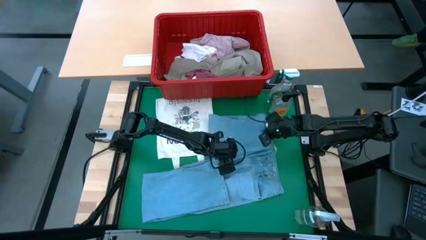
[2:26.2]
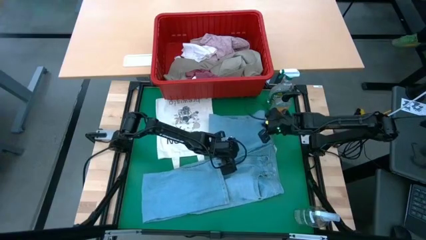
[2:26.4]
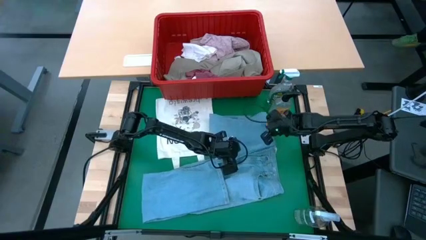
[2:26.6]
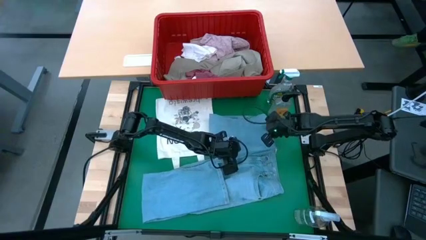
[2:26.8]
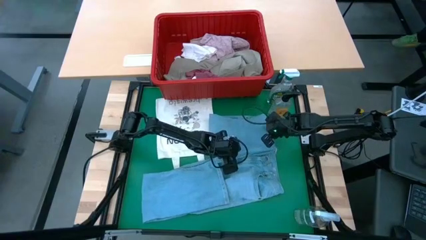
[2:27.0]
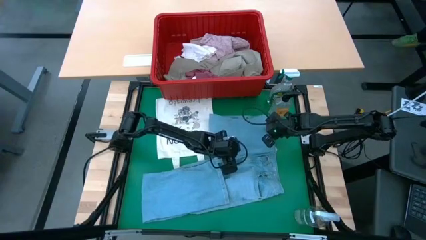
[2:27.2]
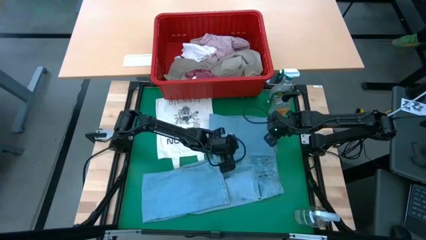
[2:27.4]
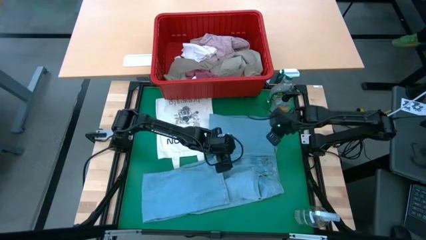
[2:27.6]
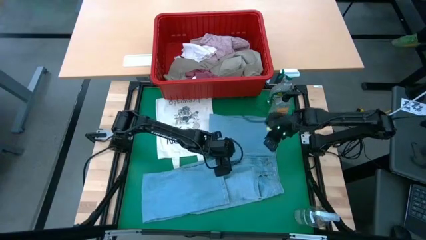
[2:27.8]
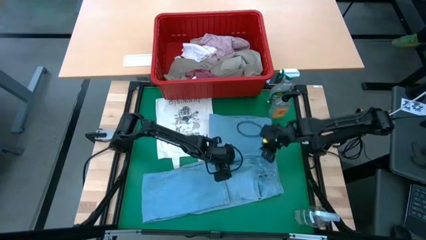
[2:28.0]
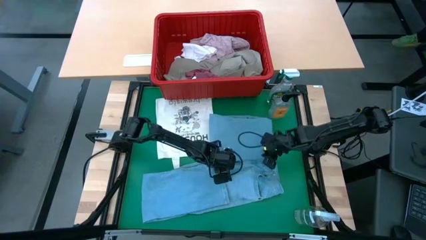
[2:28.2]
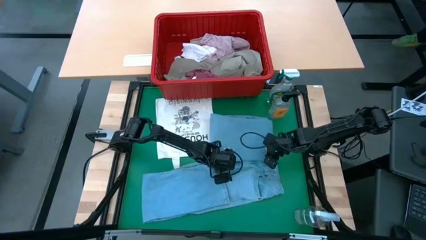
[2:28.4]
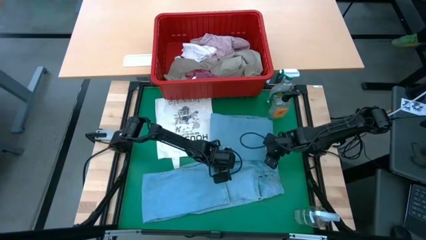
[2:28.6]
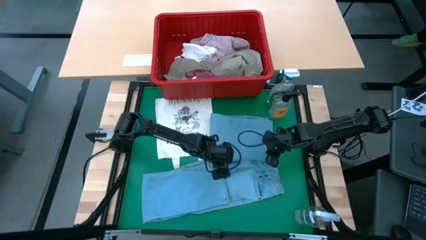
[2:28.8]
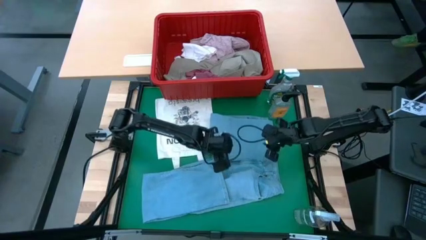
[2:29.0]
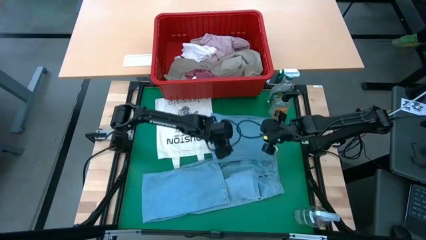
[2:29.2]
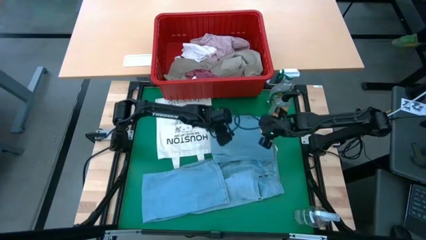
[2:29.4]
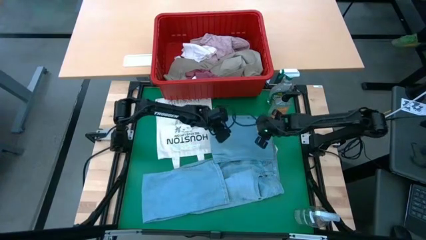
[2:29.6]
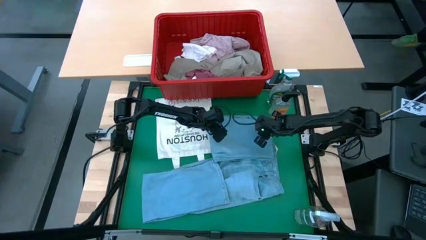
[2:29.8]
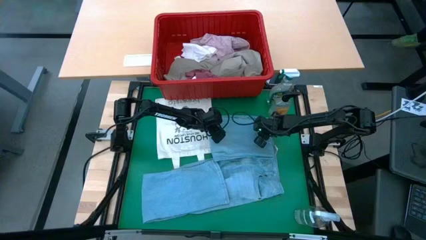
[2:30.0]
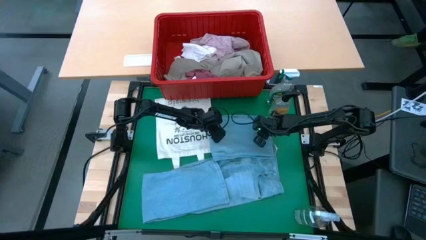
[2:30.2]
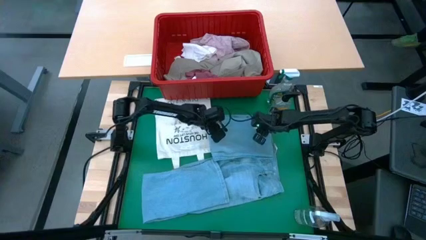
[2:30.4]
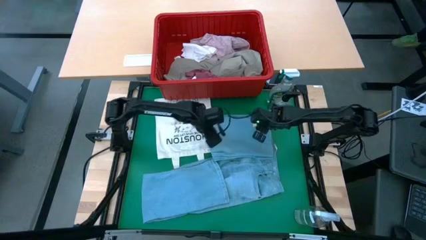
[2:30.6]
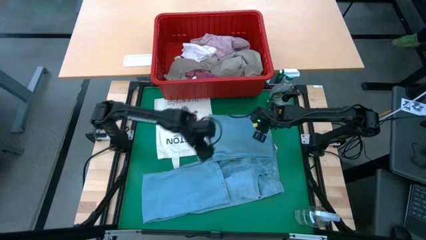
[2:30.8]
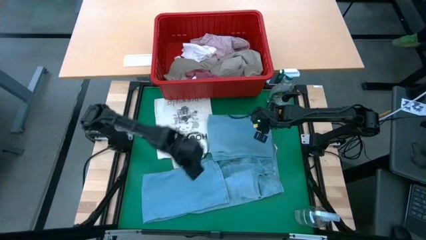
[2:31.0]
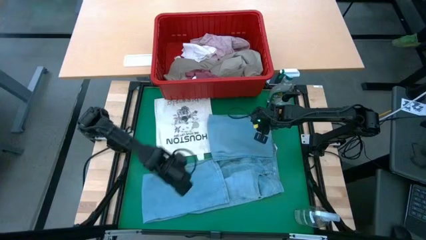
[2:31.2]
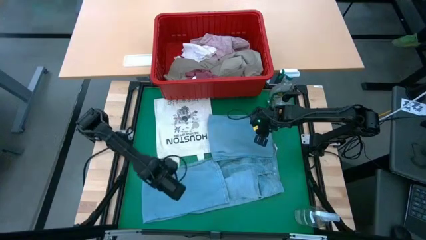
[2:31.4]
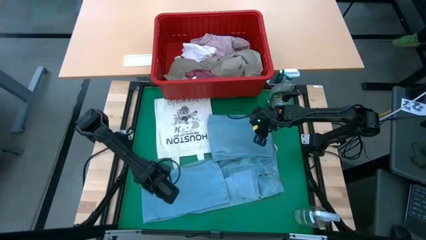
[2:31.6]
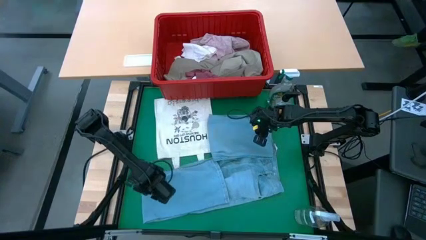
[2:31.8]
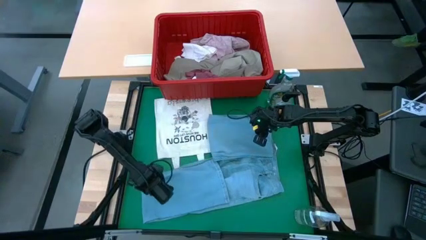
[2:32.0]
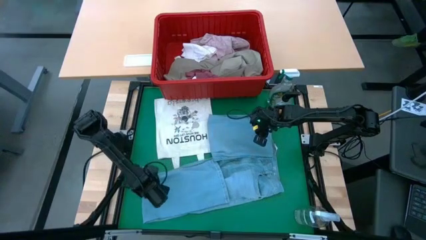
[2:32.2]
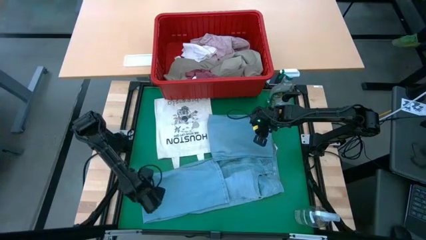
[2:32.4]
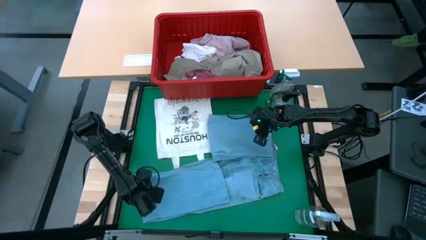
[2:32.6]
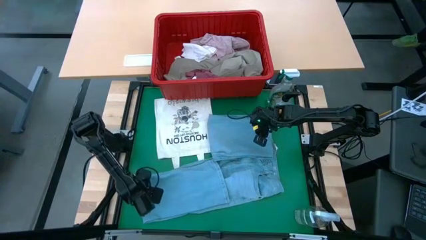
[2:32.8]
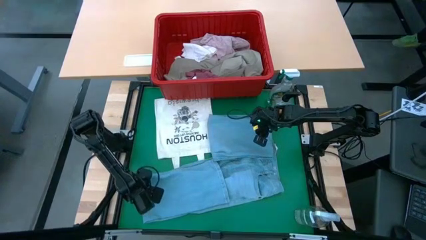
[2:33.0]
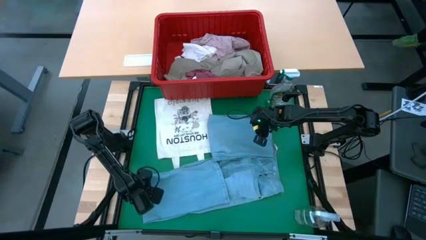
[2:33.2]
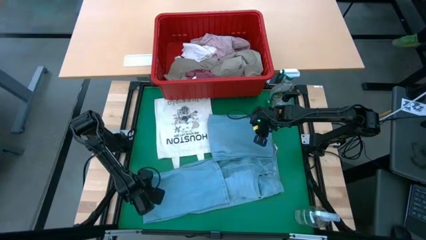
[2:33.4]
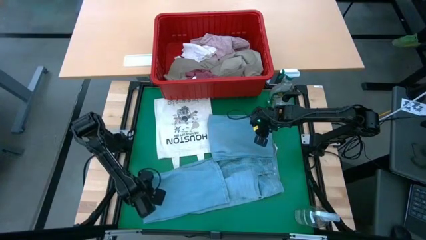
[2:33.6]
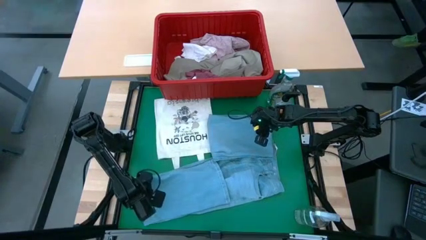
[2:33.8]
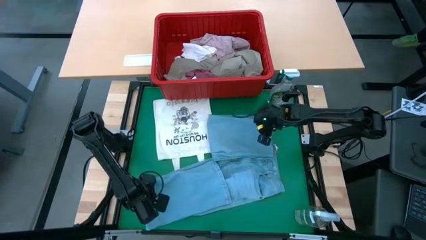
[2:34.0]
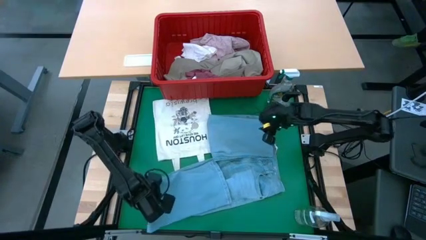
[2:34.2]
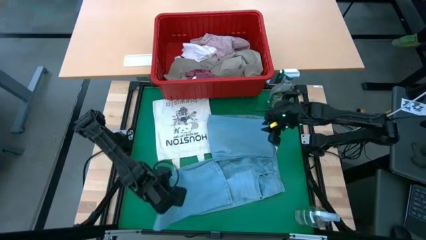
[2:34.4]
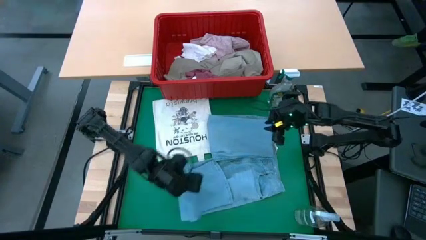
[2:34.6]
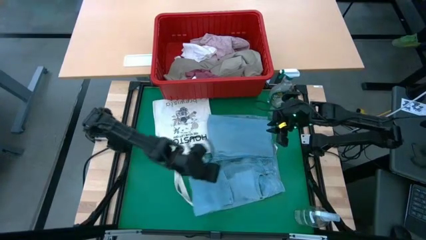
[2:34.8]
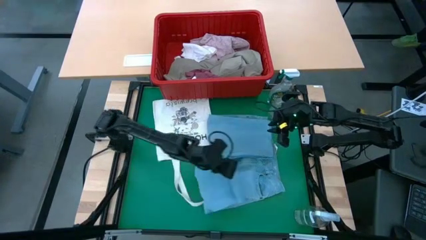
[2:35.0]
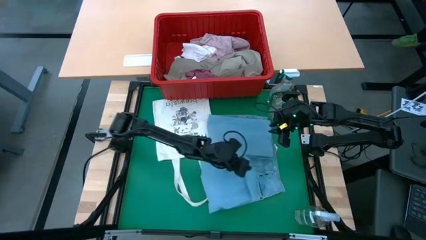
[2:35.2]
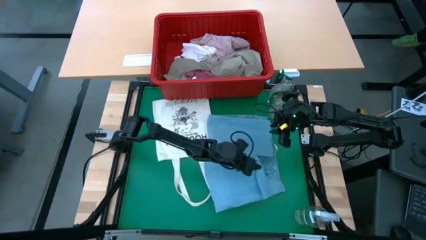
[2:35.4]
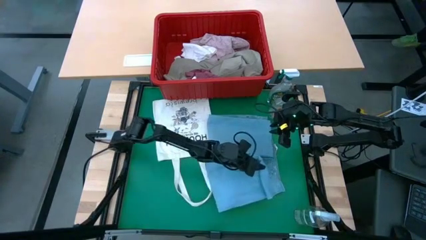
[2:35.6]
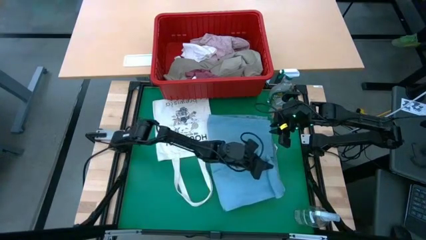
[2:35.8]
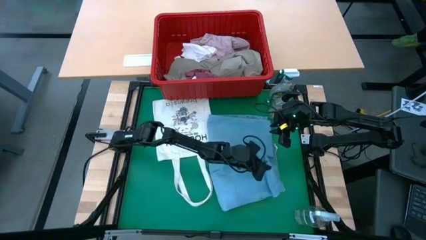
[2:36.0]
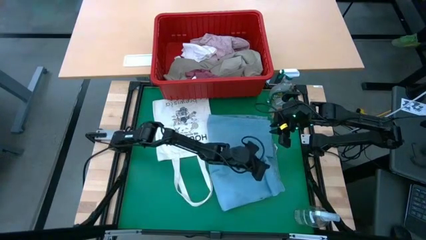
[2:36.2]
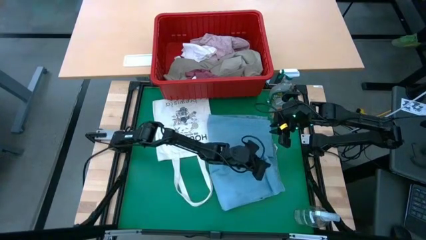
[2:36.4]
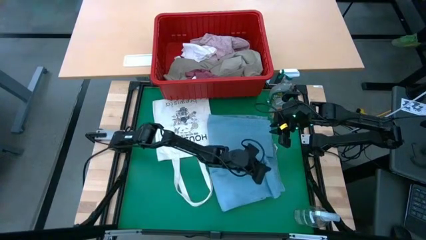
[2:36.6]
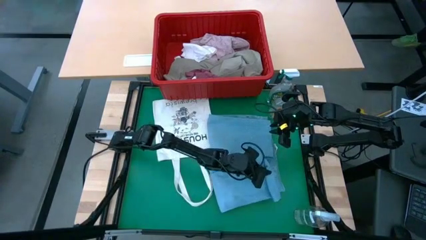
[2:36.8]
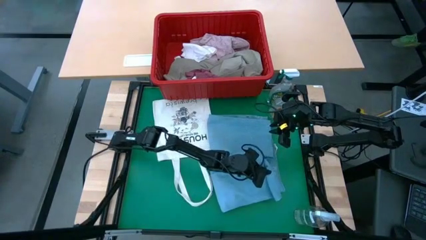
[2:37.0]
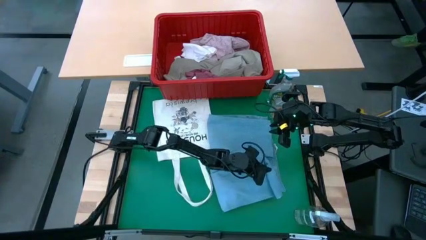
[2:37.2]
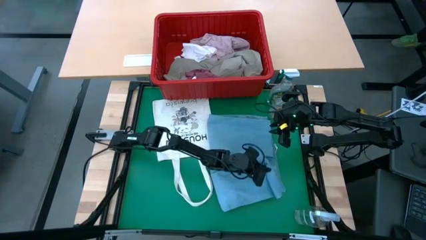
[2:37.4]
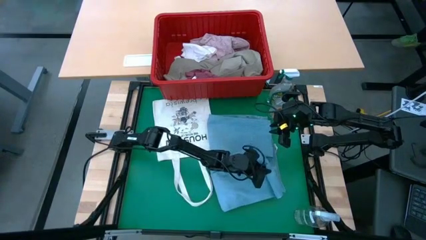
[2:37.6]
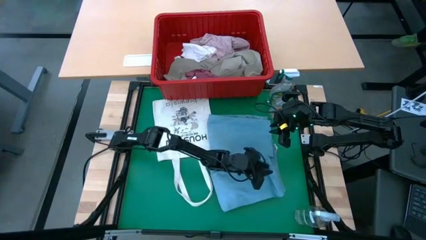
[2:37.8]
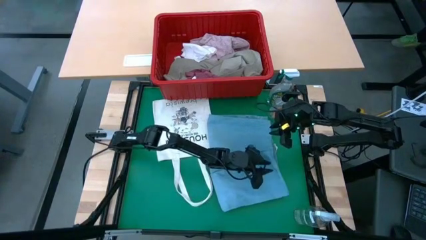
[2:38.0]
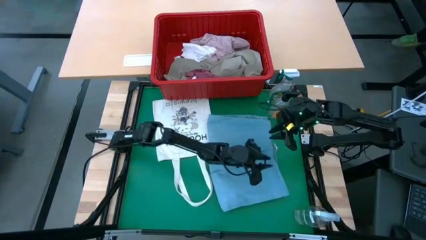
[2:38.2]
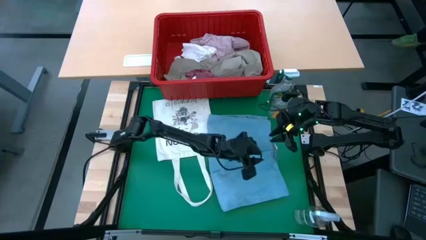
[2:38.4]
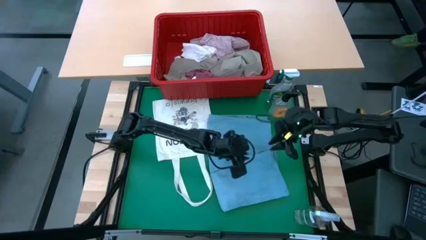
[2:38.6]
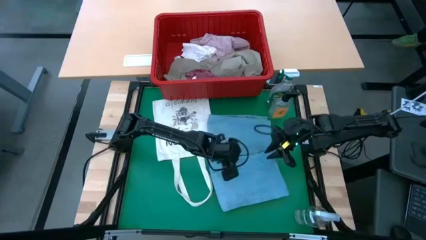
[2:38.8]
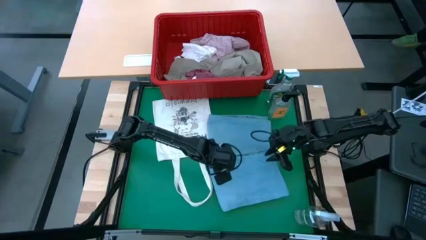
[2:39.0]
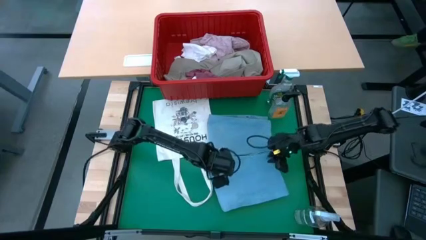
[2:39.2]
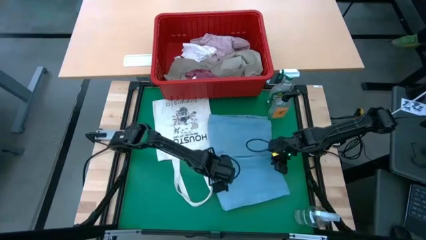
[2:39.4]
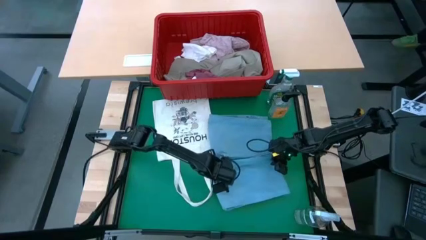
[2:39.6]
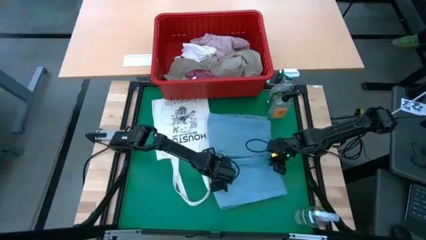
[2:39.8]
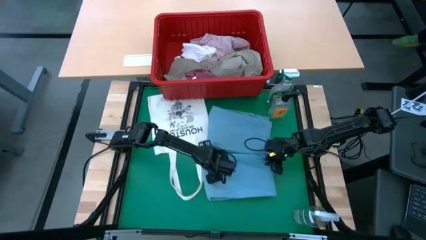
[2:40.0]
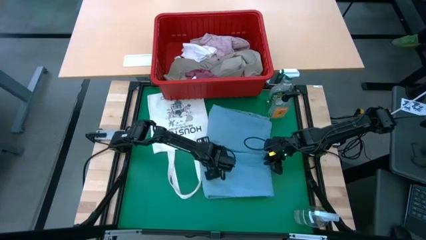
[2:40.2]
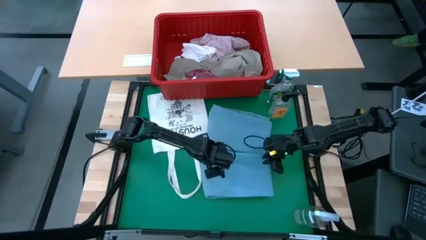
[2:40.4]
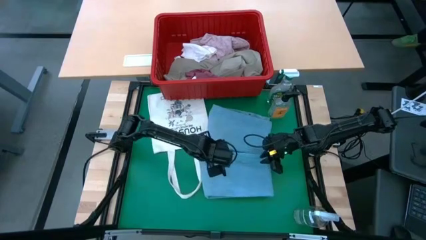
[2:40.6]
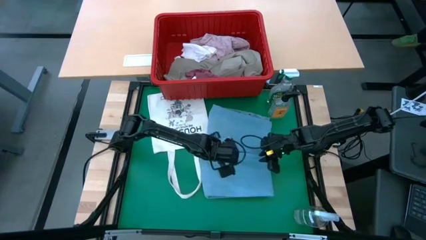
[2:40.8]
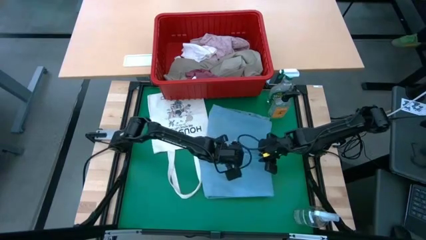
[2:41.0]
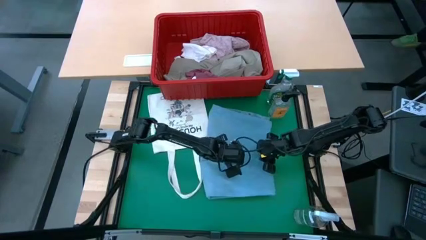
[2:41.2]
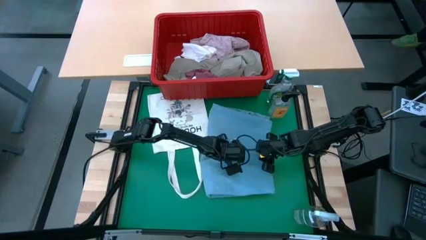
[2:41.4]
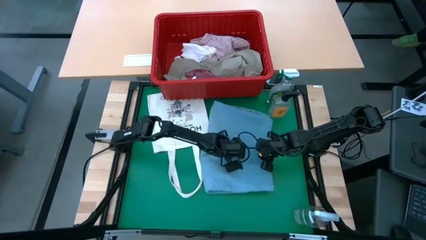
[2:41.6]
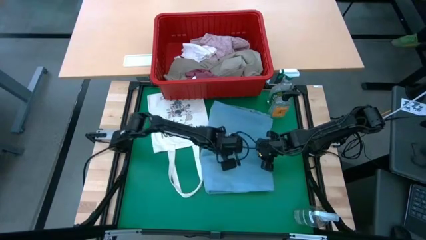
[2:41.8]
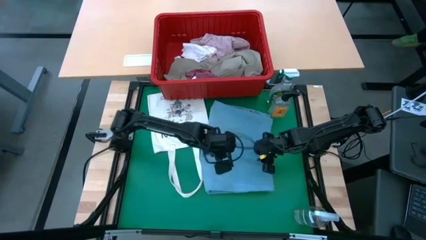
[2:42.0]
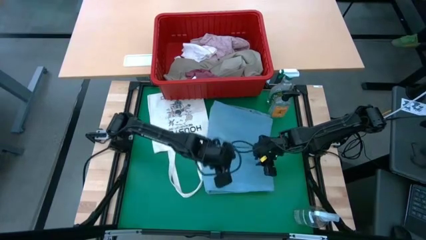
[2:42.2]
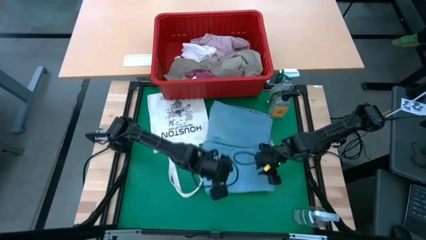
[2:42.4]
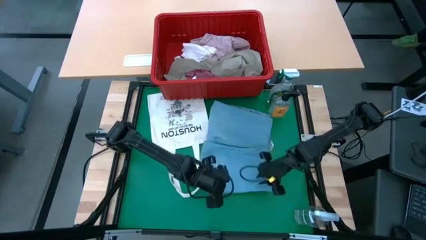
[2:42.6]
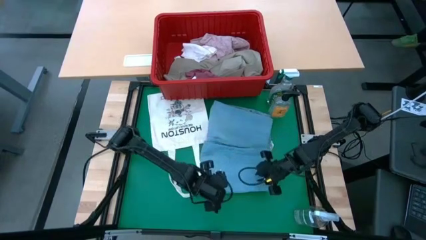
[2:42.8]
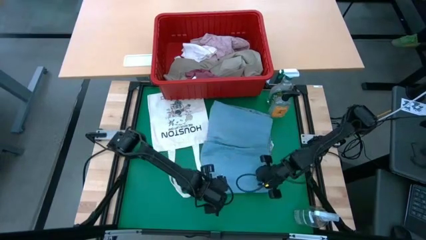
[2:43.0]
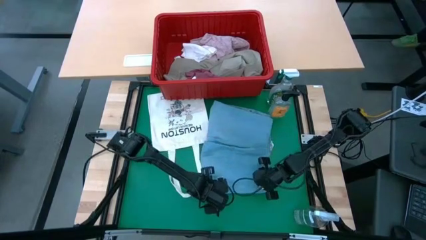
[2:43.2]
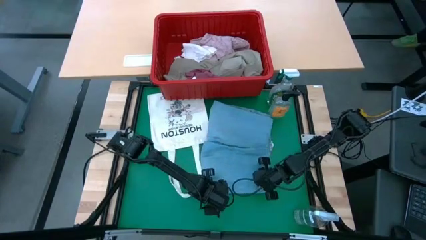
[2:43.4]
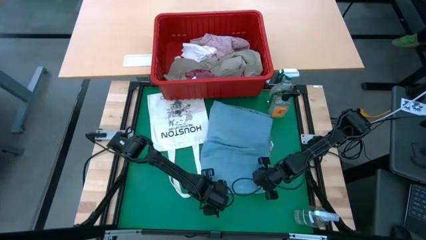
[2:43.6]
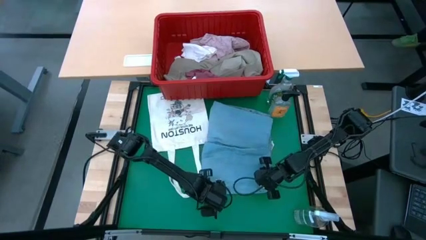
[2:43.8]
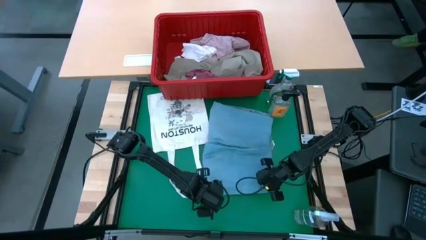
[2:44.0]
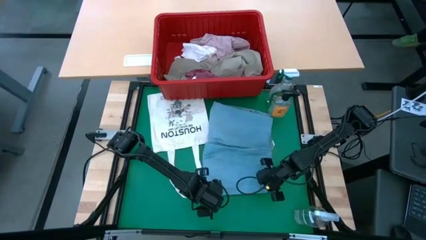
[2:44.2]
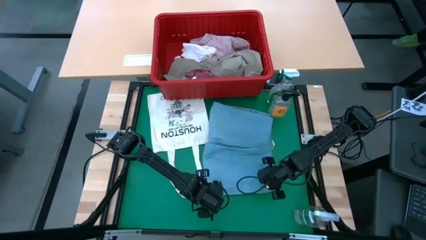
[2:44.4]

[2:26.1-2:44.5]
Task: Fold laundry
Fold the light blue pants
